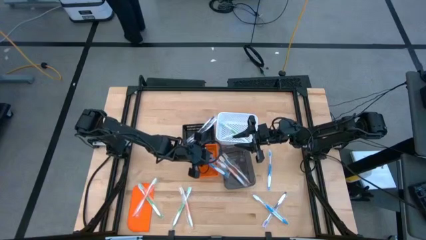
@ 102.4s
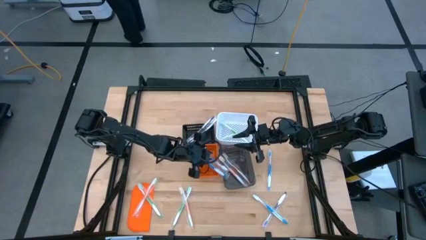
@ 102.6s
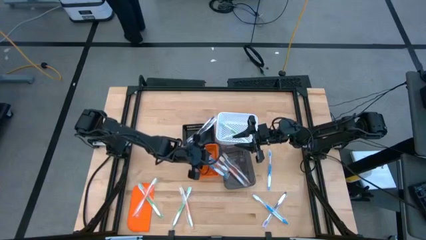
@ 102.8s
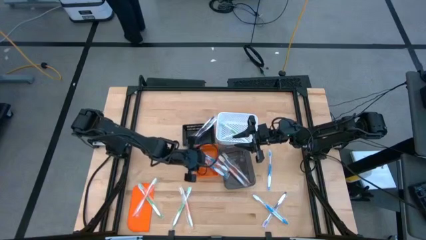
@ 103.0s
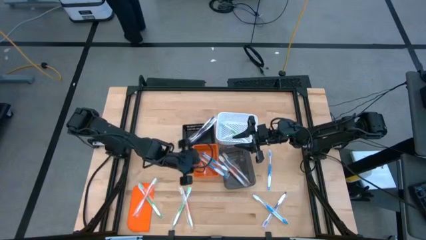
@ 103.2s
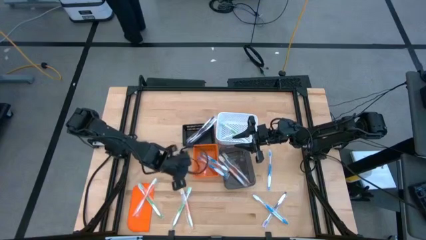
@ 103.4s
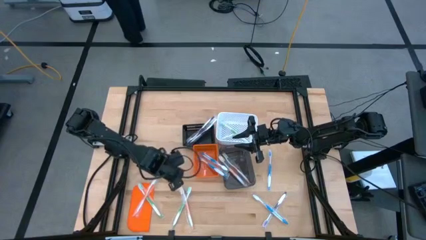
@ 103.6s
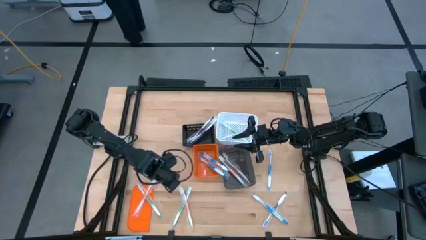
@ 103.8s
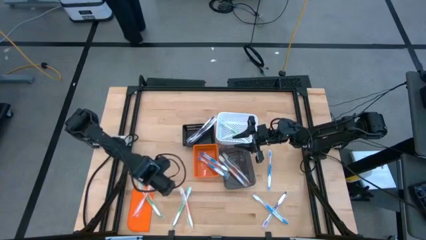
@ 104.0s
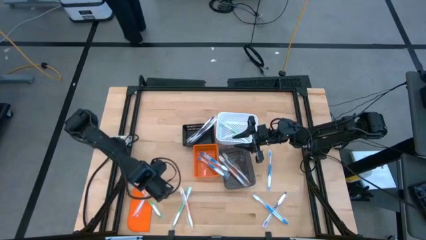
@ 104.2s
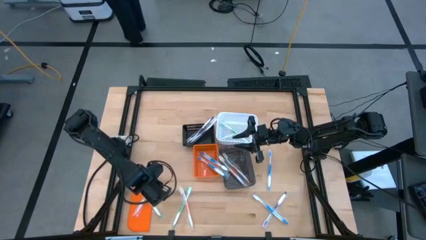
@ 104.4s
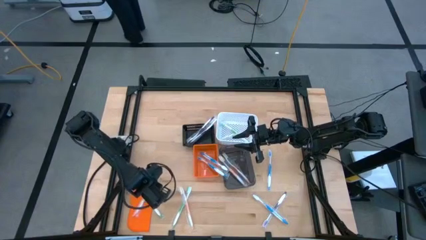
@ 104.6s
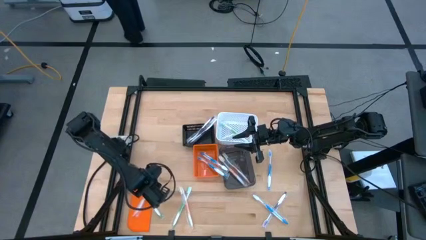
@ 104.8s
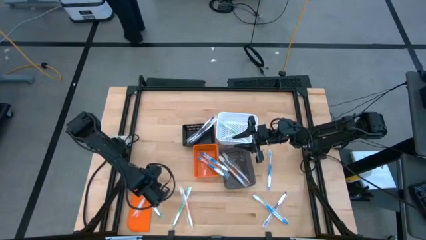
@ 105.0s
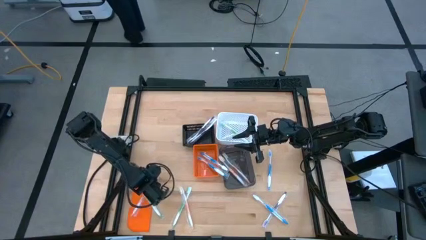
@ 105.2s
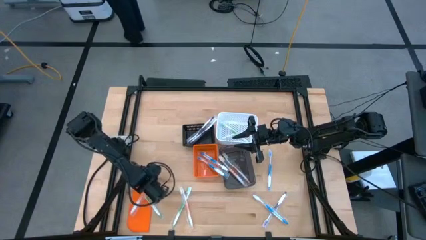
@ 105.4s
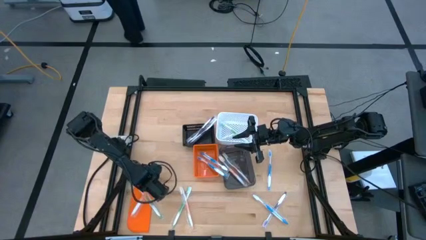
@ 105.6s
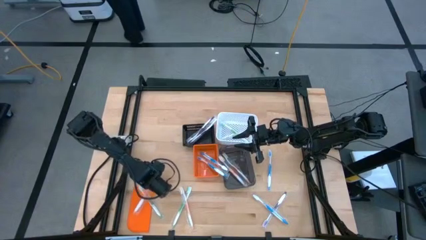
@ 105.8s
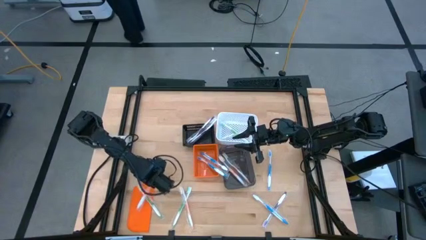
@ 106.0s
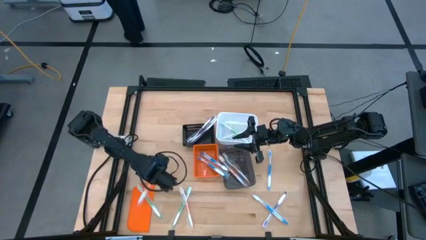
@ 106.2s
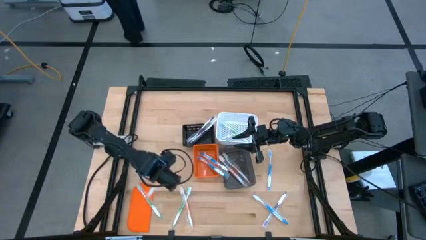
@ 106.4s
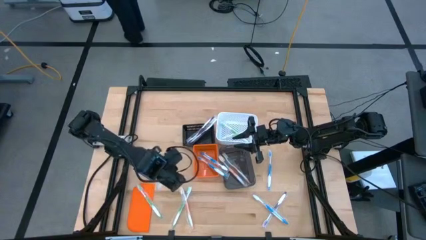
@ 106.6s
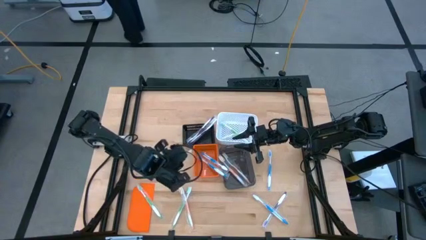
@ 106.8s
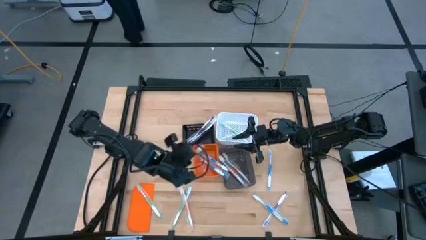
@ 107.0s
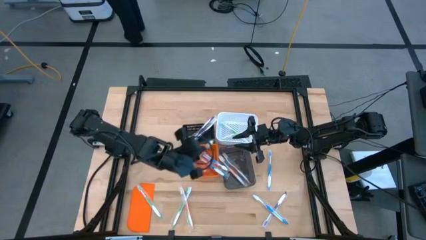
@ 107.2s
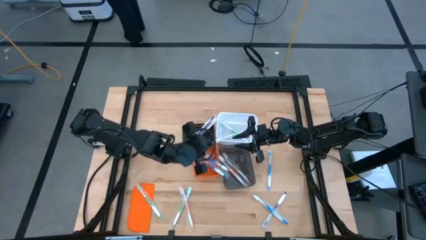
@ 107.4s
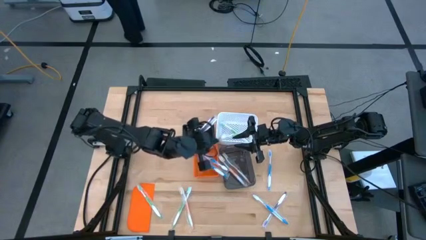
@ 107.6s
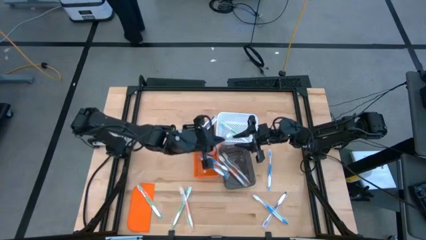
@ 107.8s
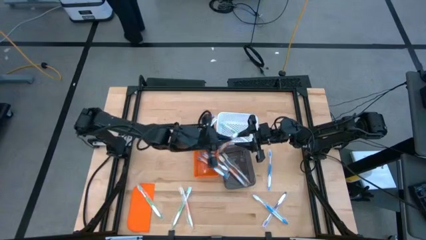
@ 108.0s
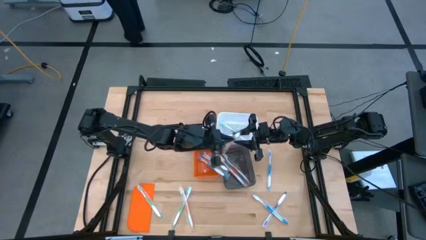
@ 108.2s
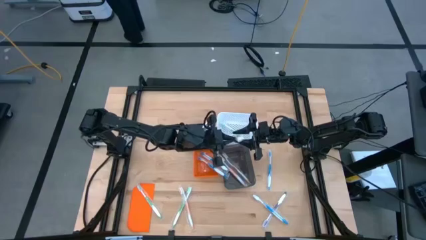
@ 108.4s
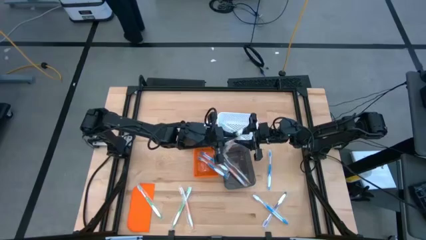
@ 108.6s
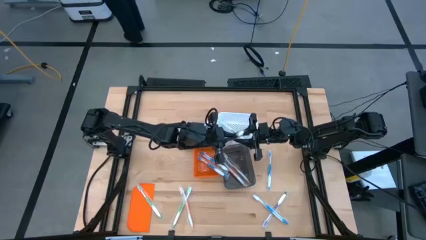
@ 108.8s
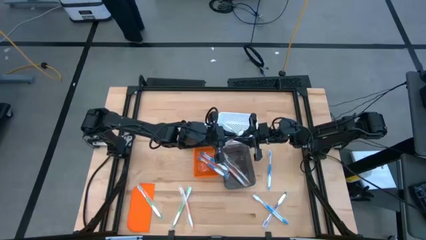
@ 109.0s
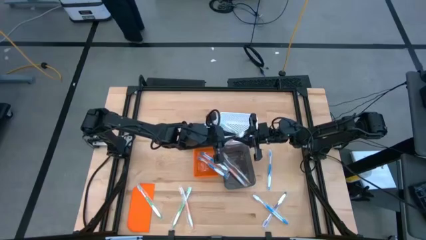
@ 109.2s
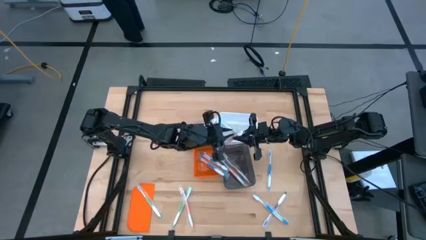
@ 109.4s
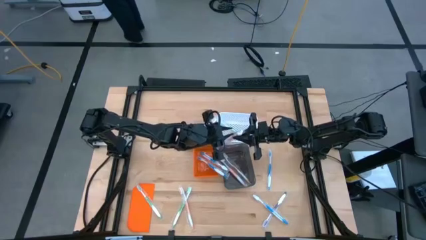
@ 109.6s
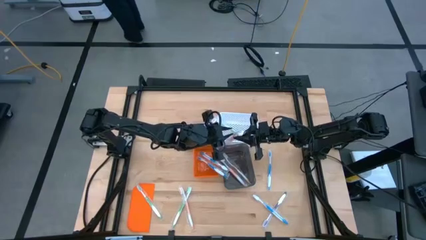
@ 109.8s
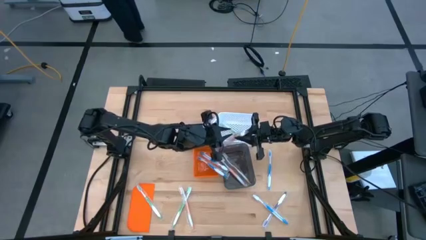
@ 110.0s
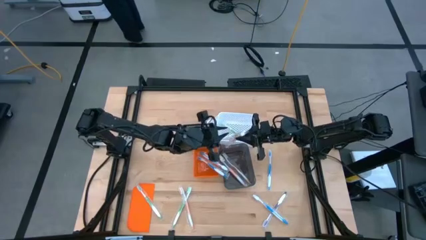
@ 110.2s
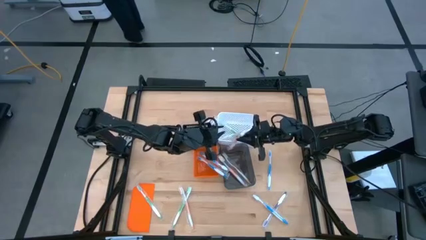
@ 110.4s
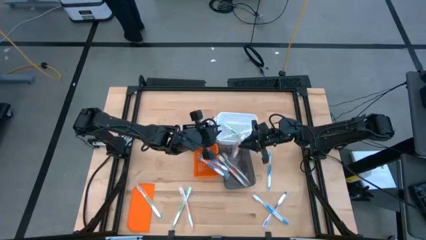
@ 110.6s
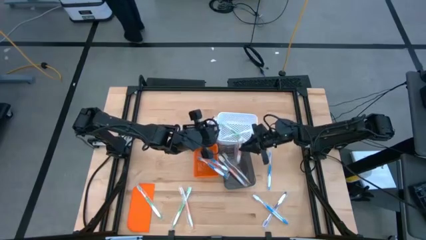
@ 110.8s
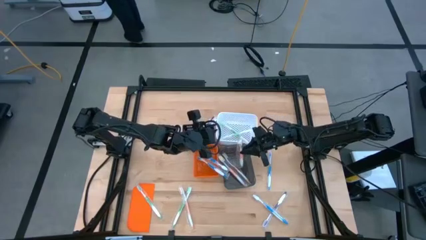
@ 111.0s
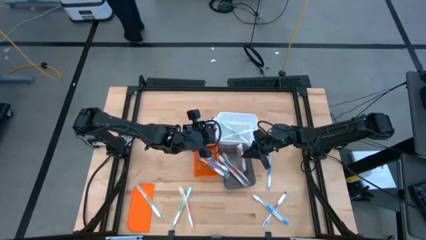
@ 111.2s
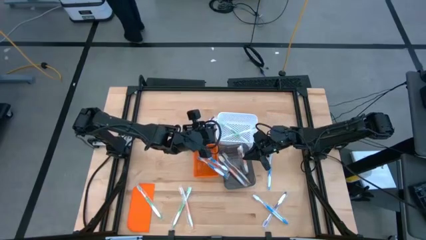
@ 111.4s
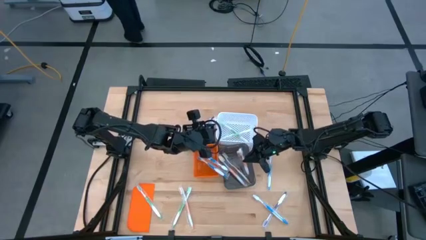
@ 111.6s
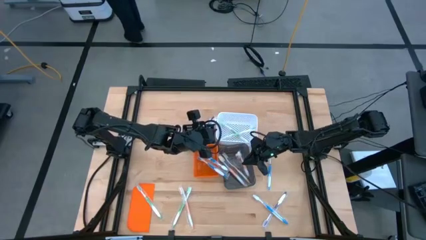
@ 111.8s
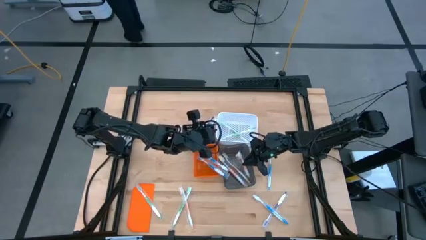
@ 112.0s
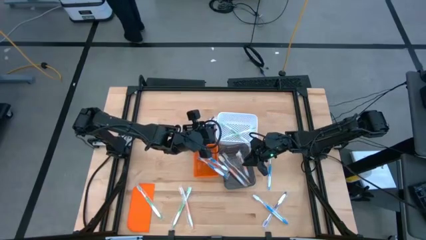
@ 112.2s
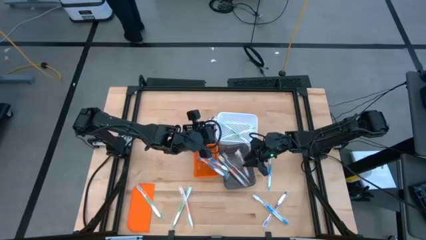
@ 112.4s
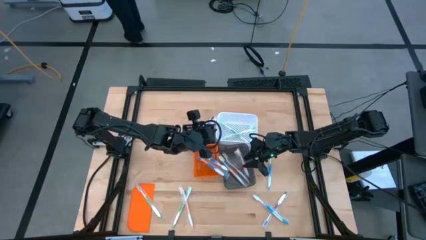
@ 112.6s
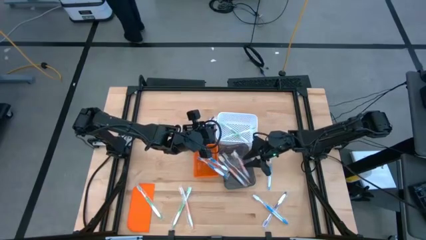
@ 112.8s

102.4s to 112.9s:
Task: Pick & Place Toothbrushes
Put the orange toothbrush into the gray bin

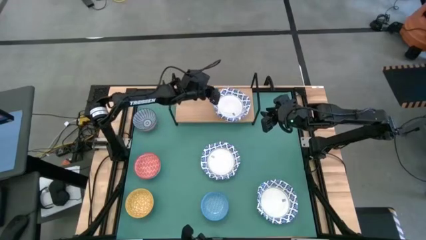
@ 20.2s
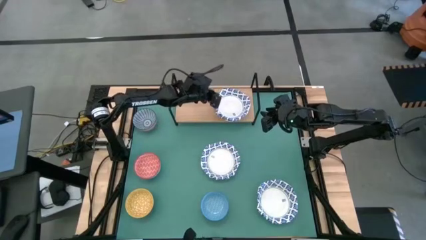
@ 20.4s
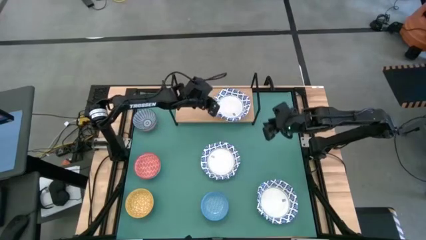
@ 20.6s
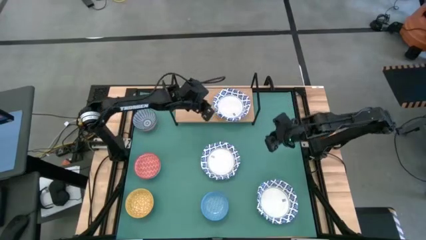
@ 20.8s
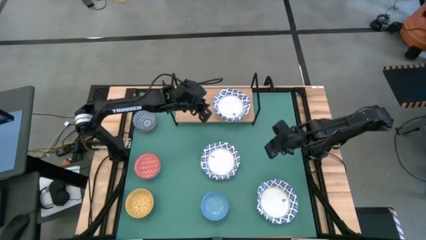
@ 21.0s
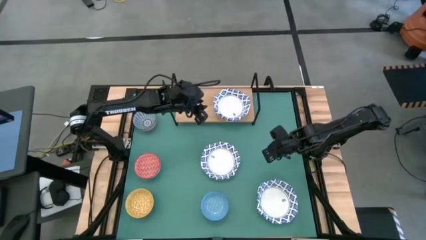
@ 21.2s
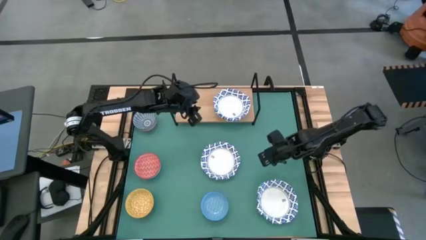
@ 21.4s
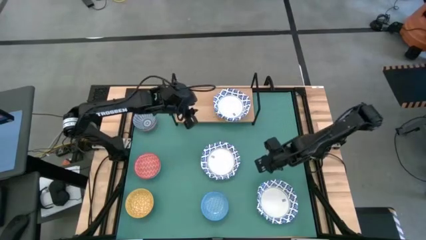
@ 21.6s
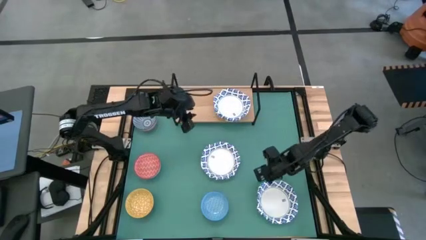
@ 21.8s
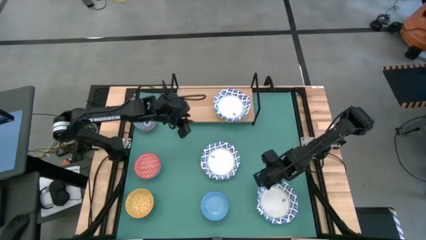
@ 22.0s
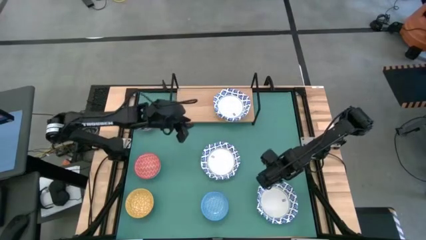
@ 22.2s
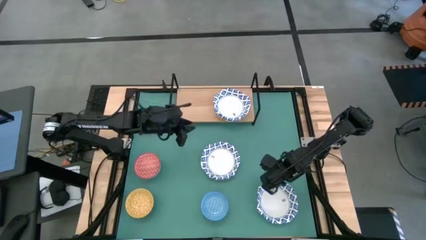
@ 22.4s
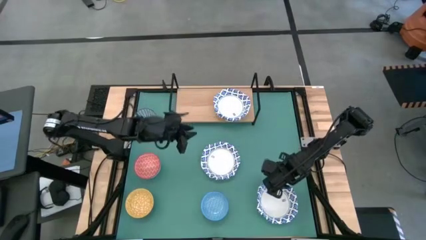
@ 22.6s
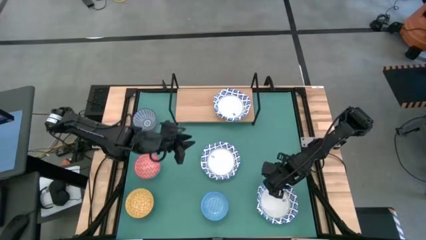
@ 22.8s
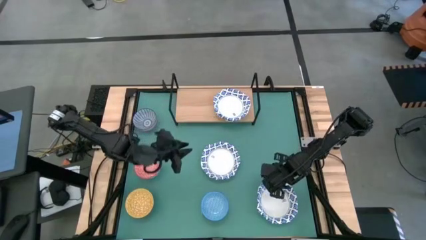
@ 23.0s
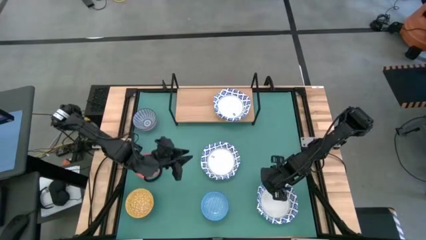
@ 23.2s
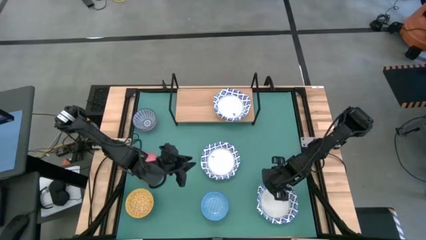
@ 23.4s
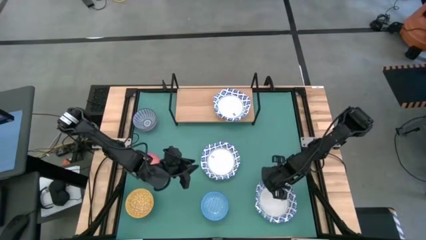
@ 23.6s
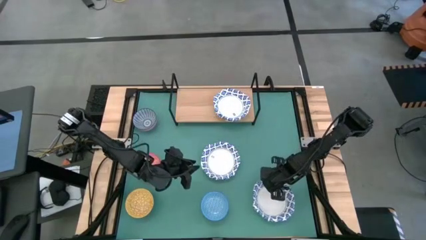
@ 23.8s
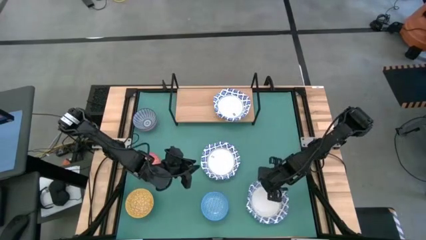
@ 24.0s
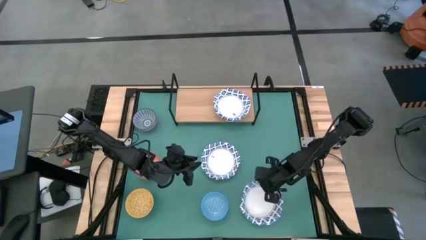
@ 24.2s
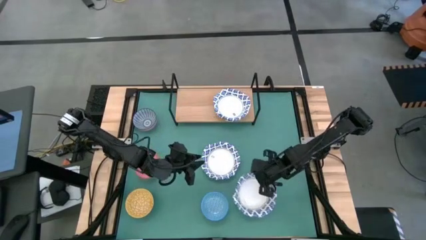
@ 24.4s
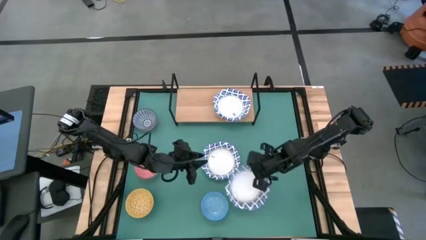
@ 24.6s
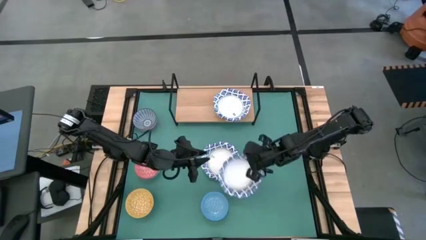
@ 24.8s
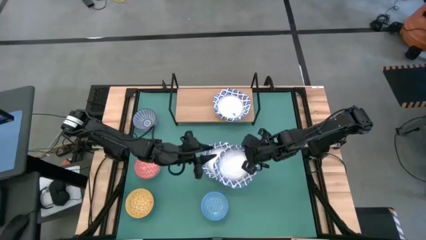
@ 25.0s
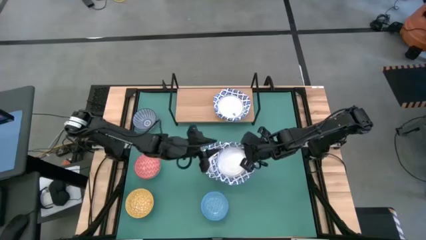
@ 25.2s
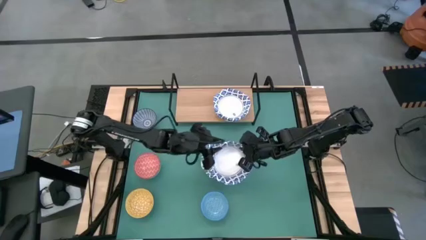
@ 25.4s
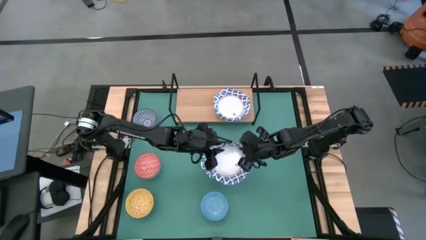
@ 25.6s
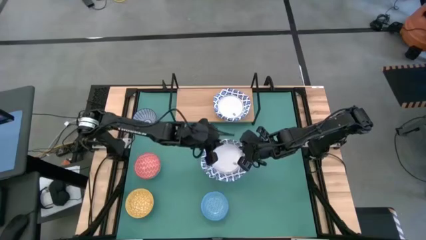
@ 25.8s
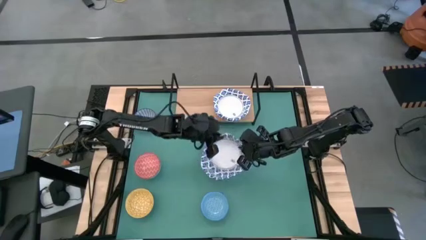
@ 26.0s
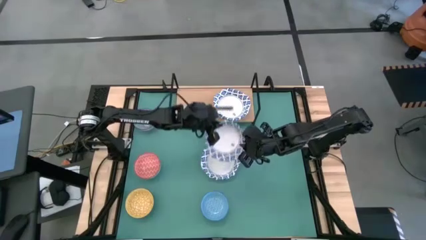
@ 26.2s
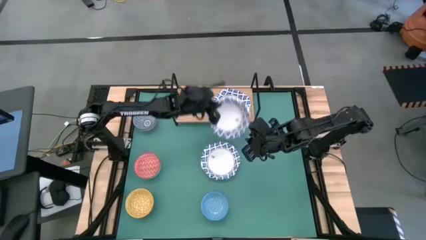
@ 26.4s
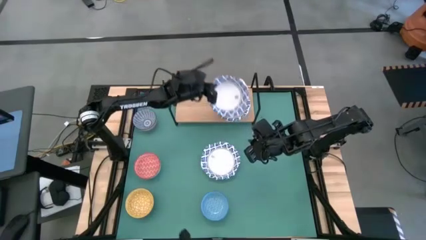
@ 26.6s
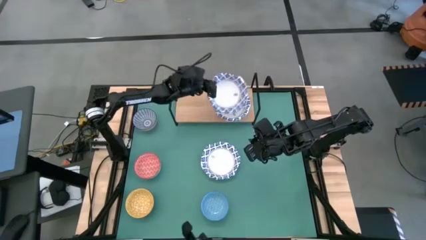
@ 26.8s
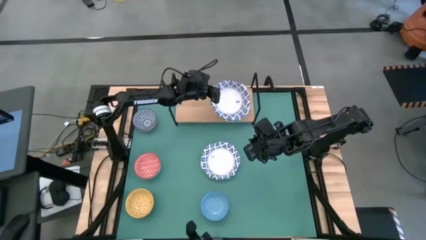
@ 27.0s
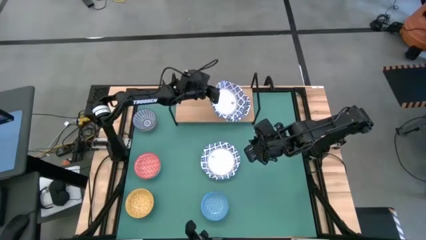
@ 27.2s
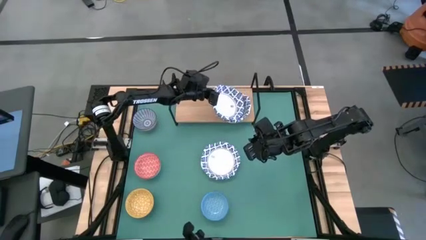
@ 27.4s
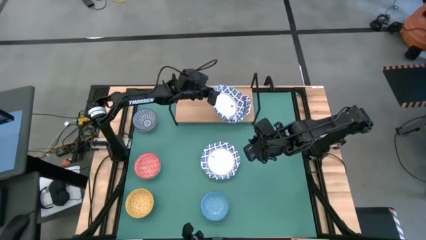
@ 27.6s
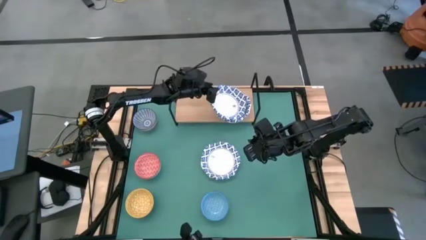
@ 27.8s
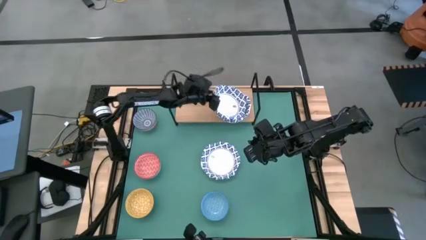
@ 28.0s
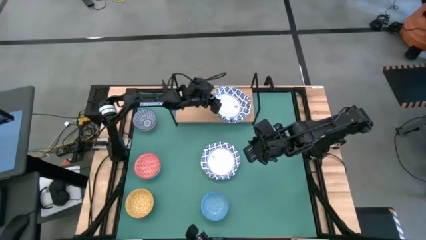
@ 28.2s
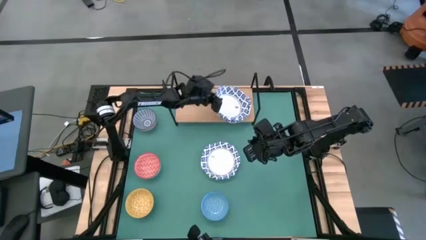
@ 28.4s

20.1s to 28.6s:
Task: Place and stack bowls onto a shelf
Stack the white bowl on top of the white bowl on the shelf
